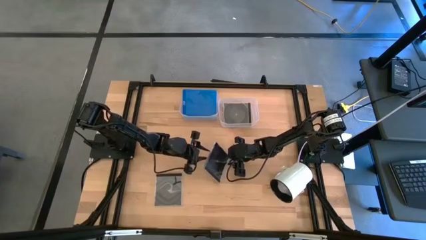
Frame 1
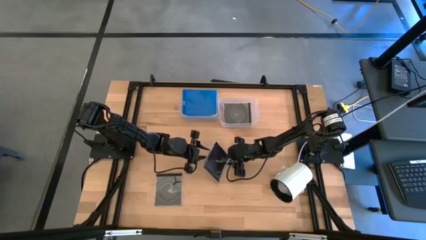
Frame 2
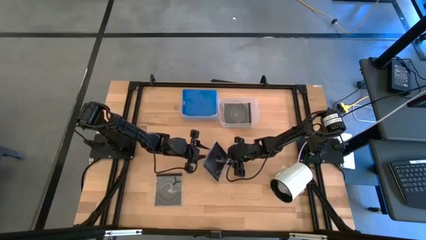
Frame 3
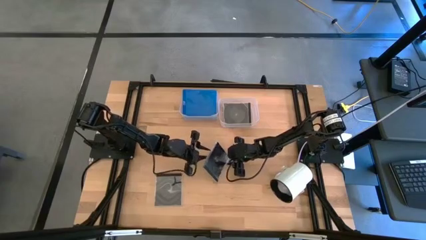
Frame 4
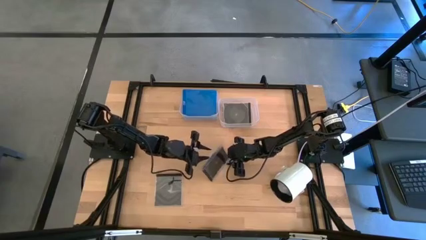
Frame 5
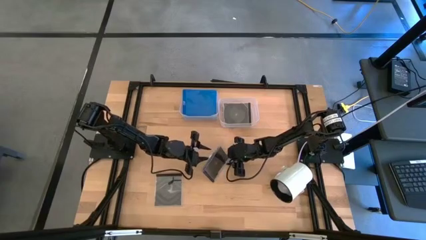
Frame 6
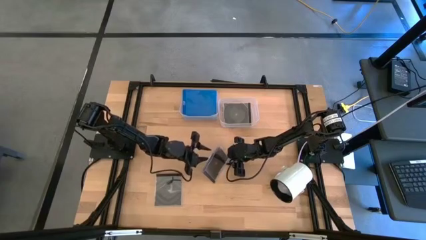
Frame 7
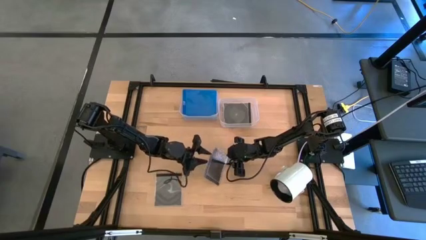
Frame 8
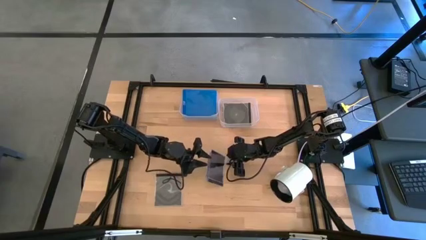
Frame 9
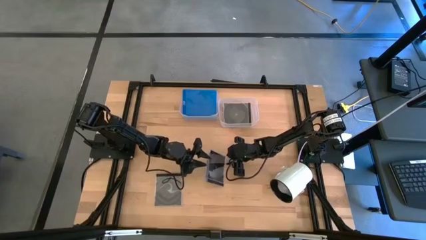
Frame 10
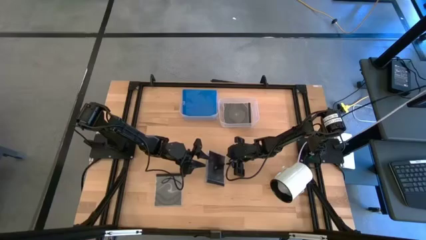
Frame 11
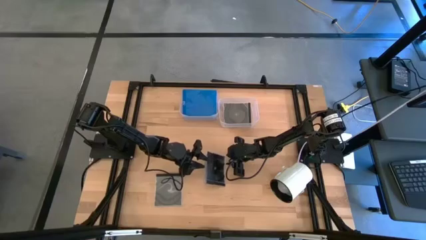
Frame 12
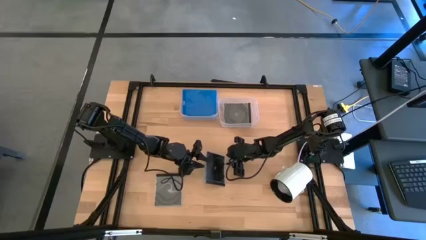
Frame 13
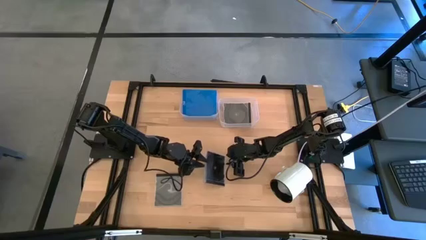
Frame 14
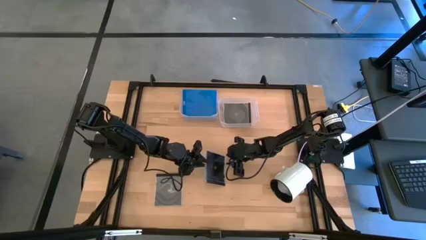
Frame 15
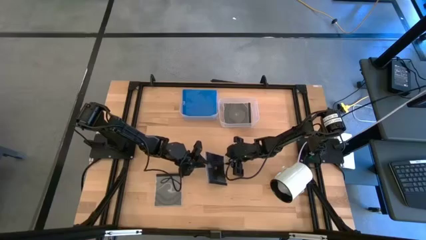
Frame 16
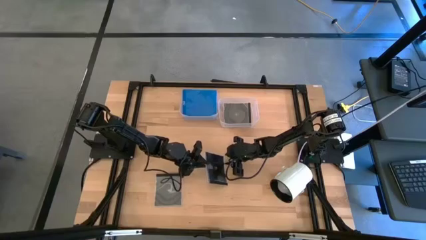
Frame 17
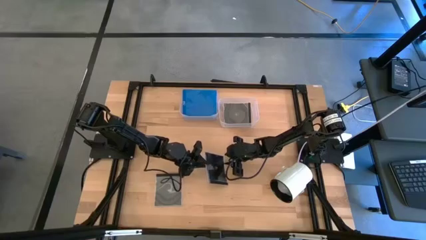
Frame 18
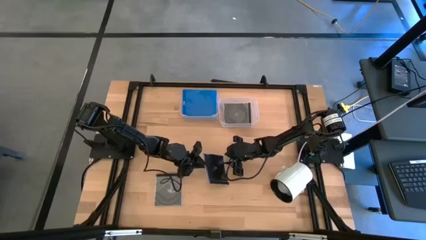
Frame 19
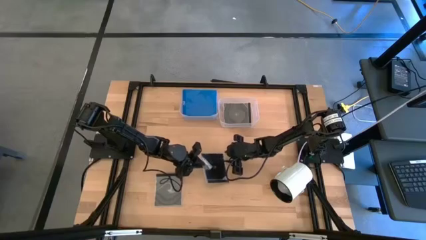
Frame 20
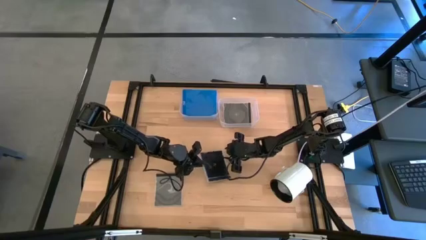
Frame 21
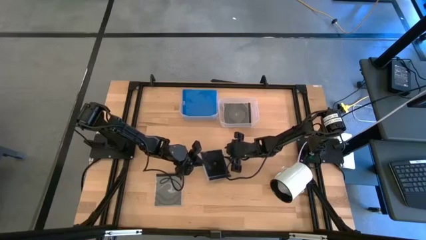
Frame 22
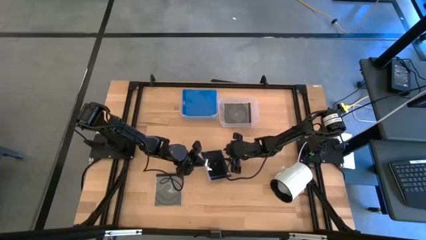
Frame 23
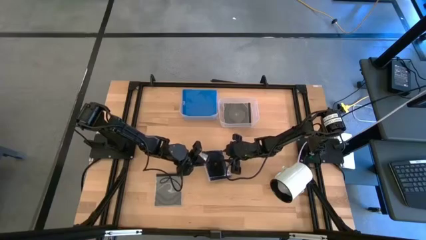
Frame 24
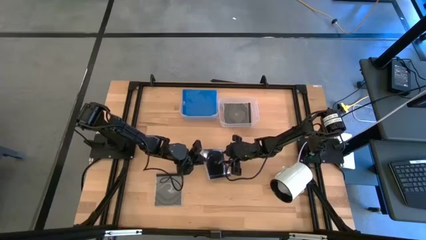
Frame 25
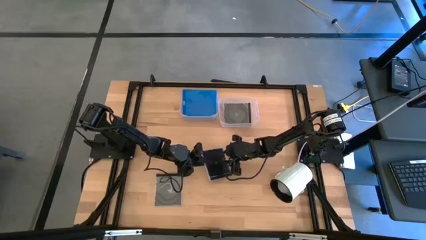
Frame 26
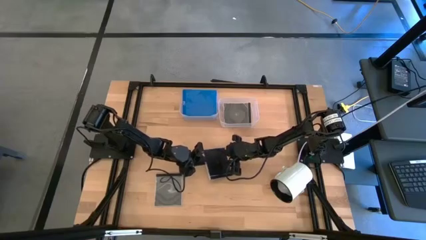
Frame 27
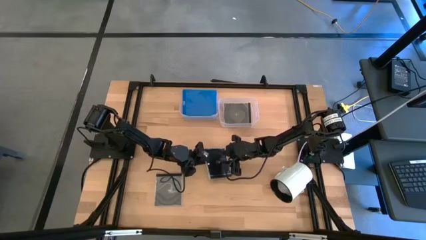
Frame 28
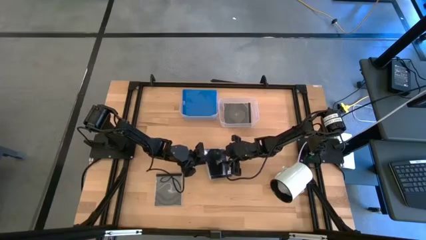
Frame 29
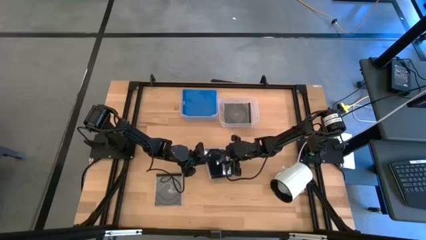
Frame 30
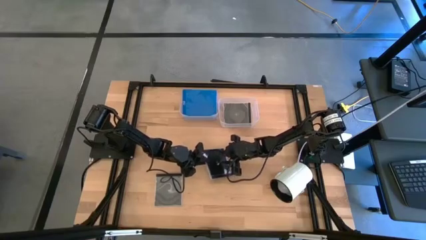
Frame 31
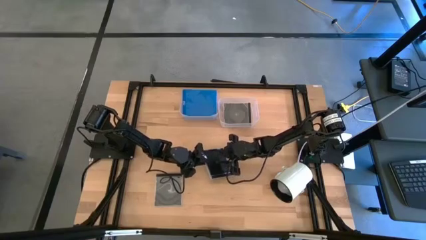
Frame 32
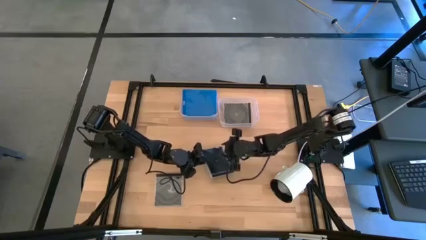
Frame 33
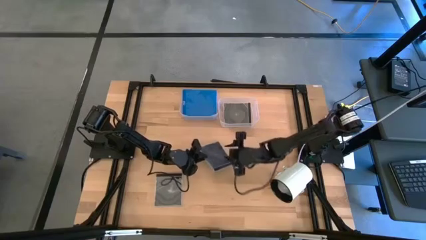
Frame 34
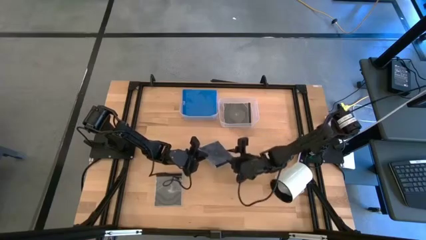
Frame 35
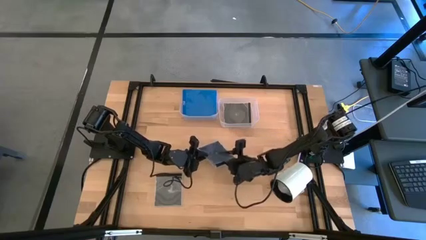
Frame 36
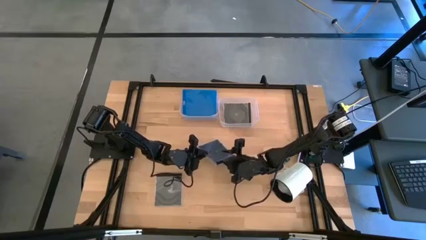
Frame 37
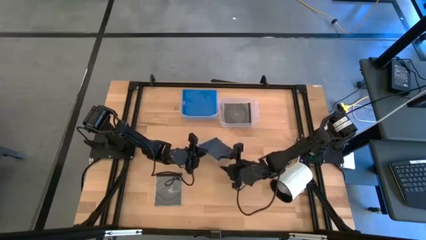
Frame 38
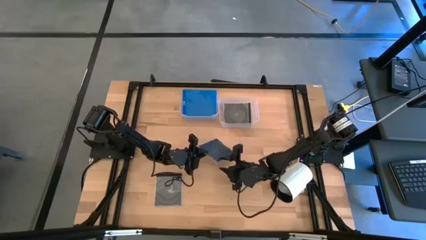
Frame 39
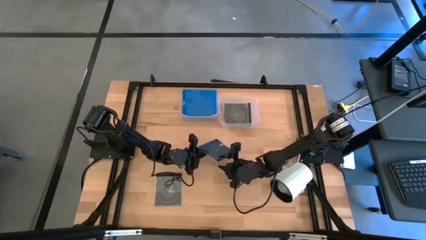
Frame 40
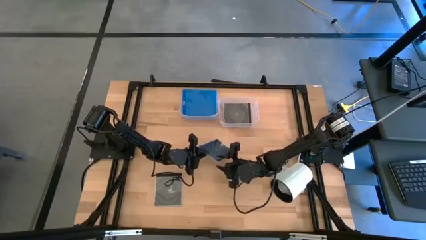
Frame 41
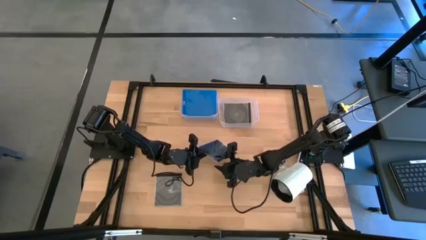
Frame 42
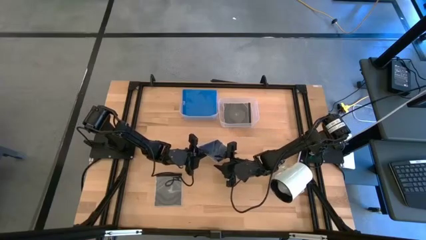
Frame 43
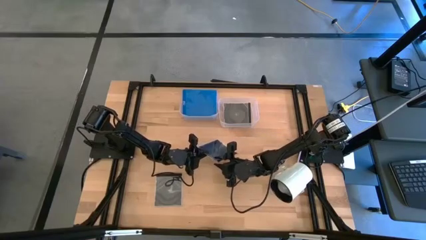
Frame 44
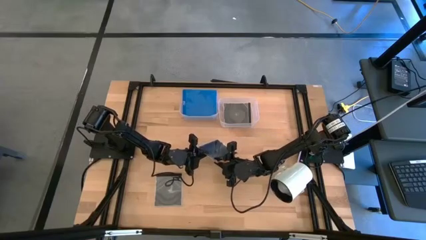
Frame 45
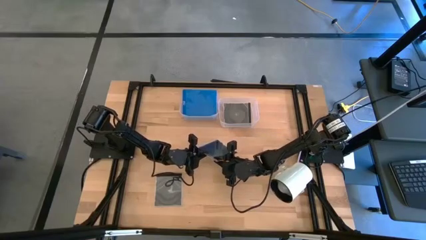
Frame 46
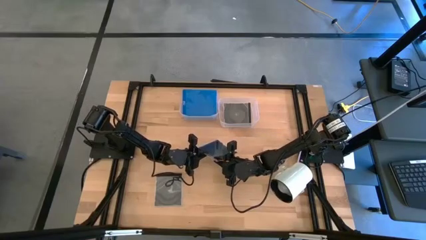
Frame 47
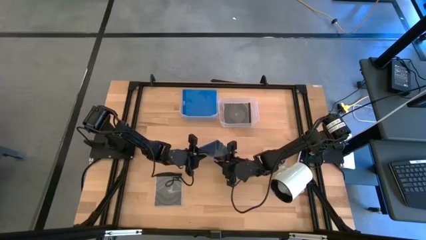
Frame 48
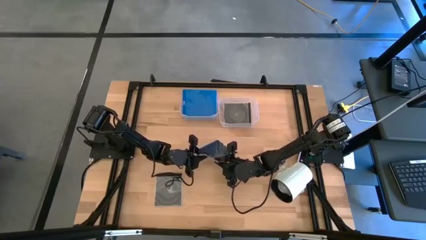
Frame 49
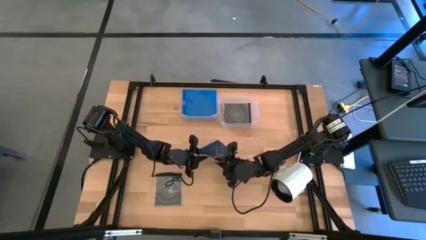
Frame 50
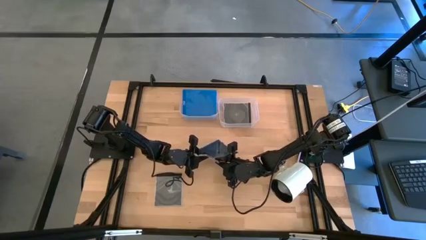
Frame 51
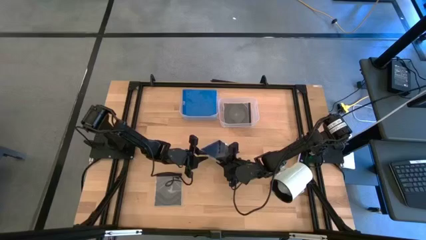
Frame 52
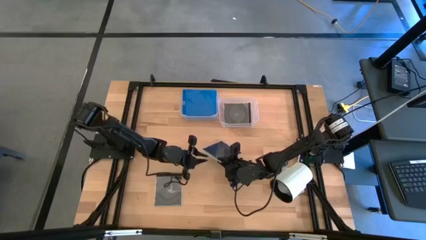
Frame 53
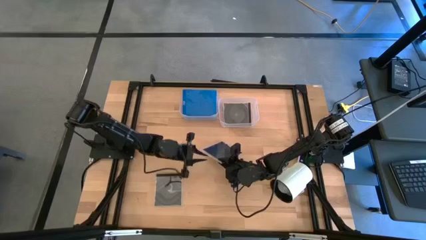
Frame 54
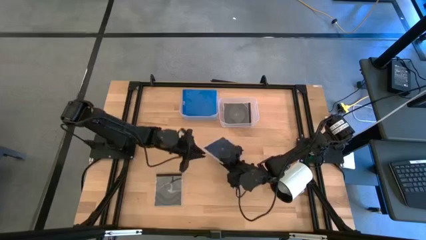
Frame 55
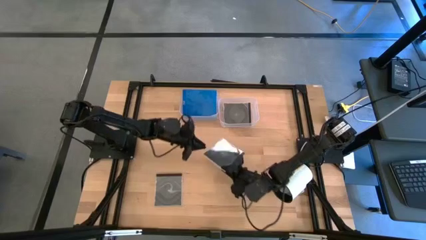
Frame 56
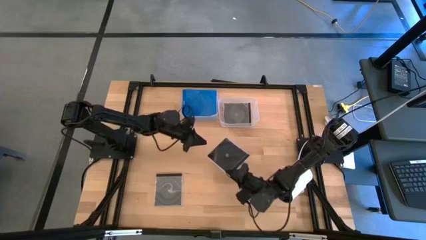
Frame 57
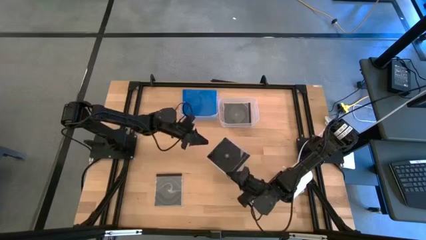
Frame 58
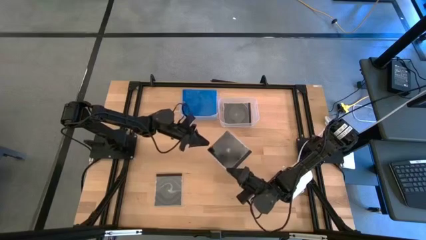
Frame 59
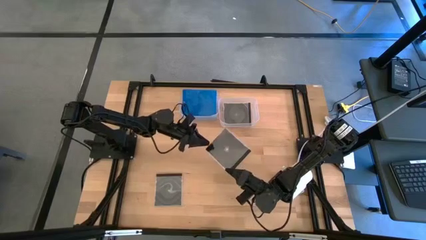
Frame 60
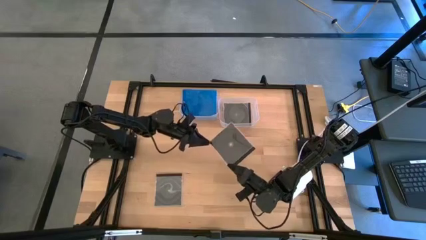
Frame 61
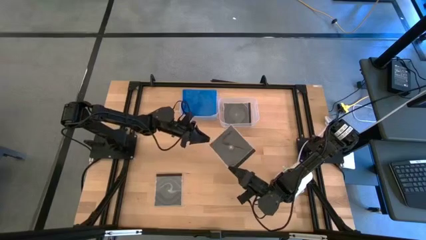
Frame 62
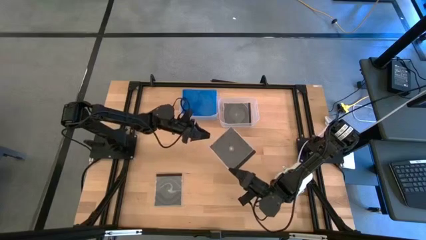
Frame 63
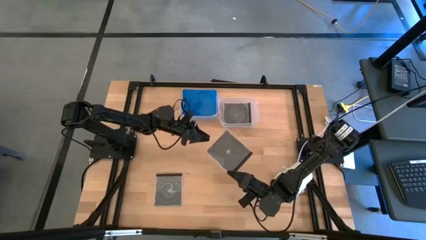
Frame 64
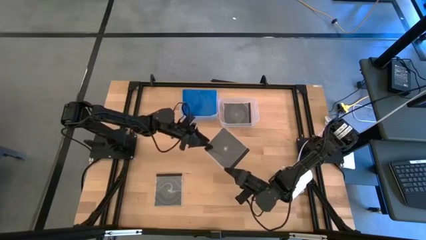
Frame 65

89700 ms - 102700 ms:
Task: Pick & place jewel cases by type
Put the right black CD case into the transparent bin
